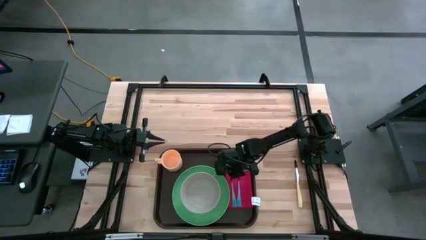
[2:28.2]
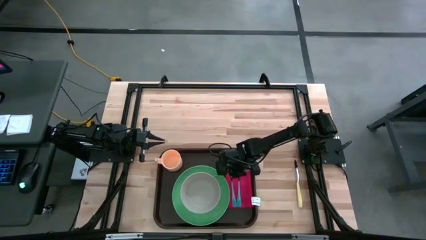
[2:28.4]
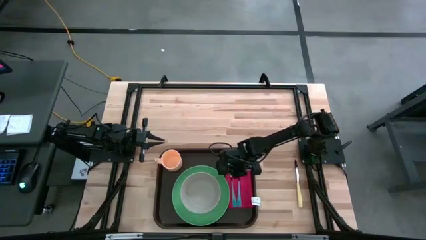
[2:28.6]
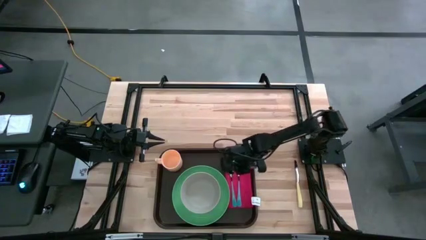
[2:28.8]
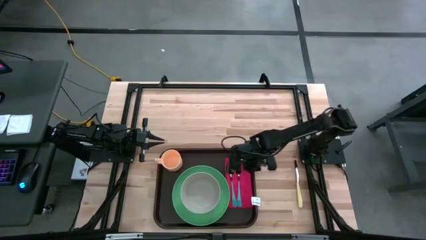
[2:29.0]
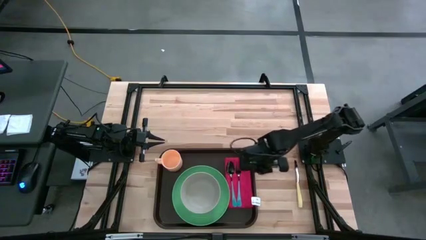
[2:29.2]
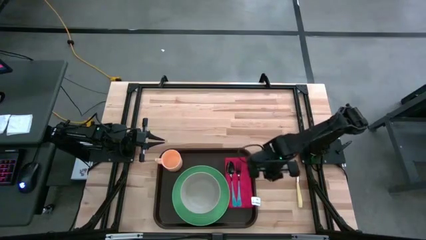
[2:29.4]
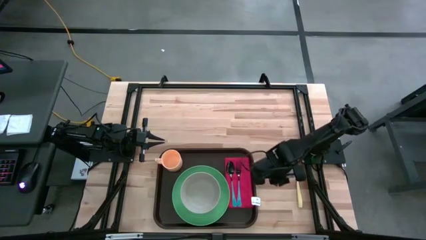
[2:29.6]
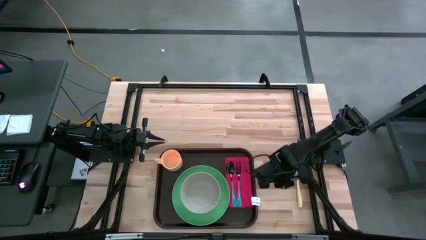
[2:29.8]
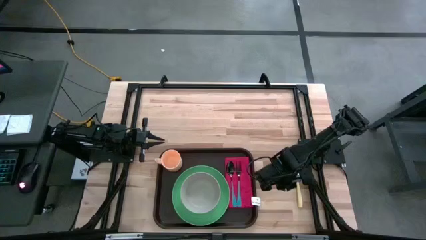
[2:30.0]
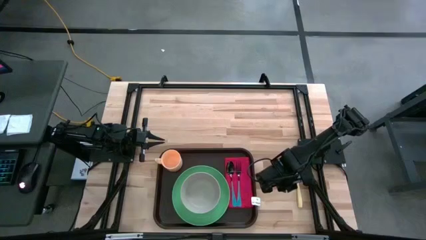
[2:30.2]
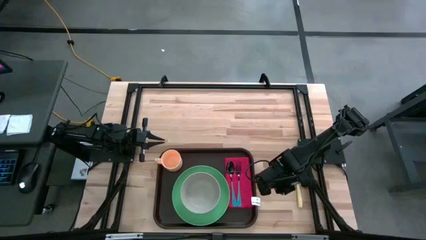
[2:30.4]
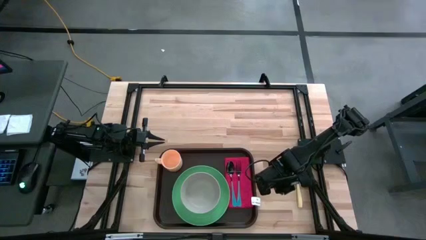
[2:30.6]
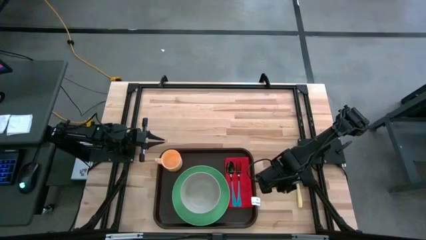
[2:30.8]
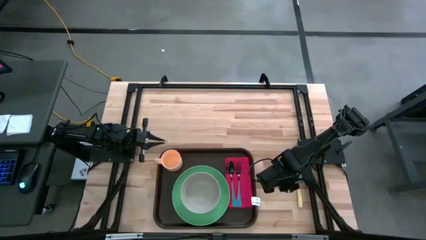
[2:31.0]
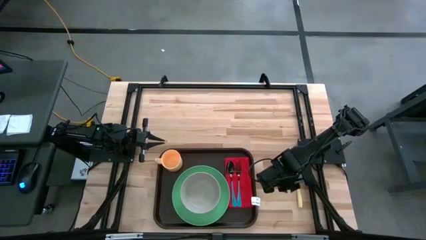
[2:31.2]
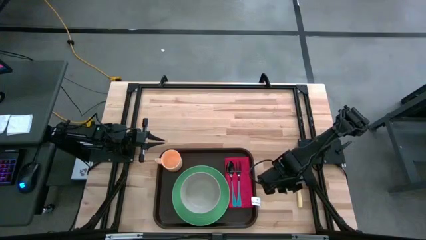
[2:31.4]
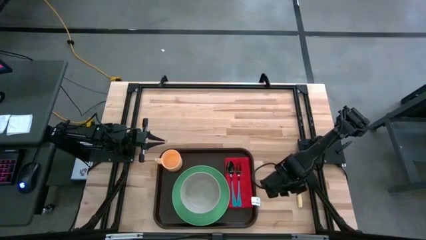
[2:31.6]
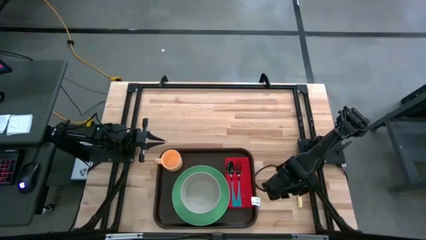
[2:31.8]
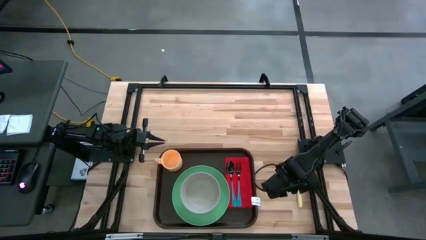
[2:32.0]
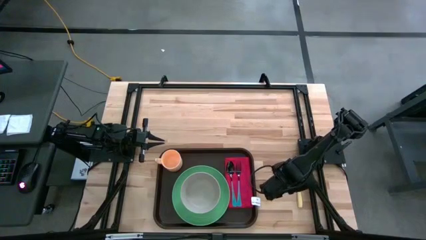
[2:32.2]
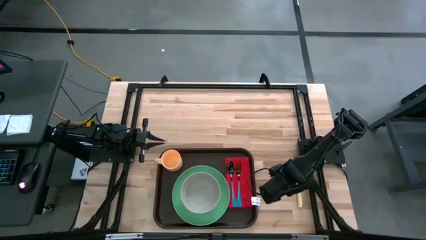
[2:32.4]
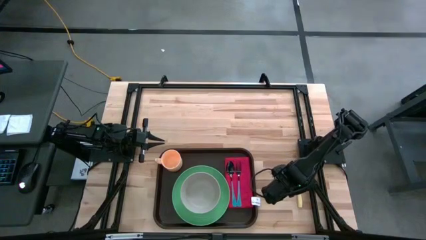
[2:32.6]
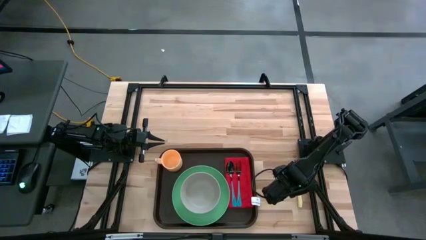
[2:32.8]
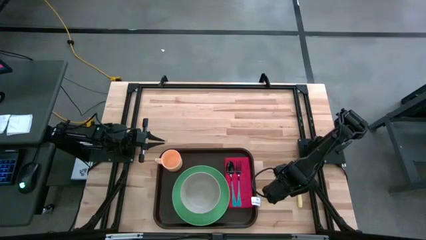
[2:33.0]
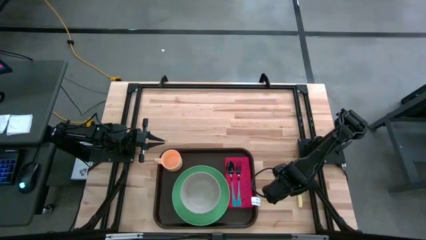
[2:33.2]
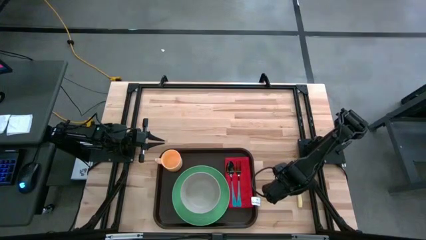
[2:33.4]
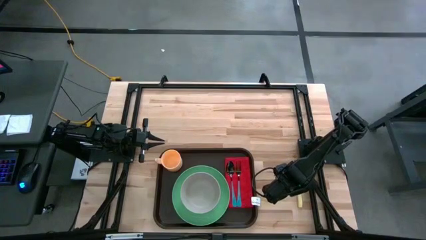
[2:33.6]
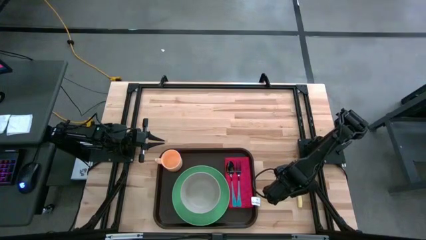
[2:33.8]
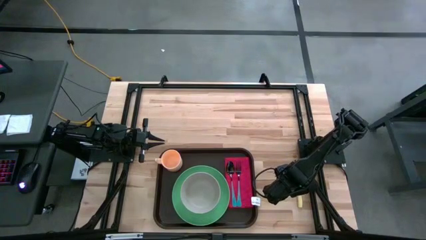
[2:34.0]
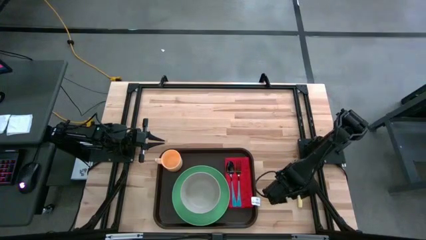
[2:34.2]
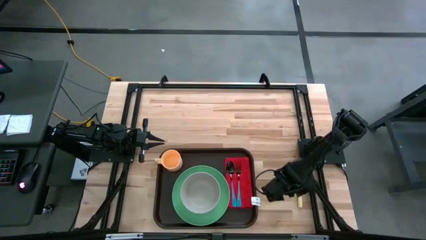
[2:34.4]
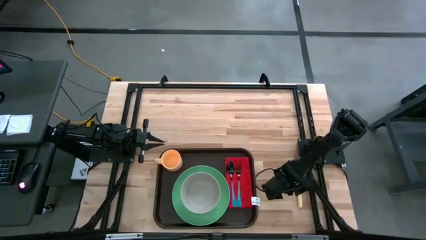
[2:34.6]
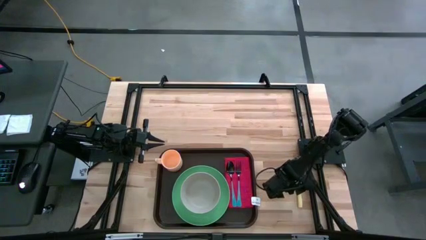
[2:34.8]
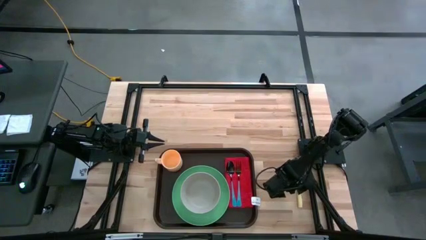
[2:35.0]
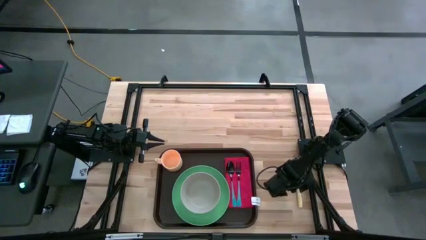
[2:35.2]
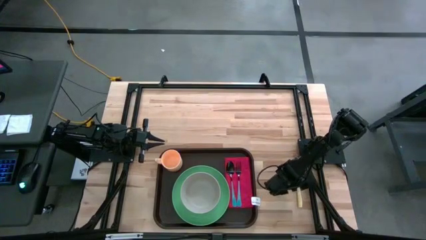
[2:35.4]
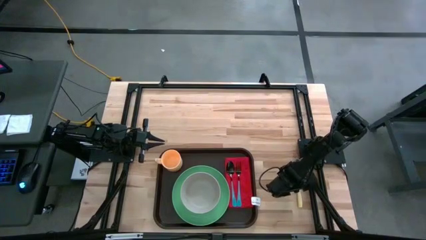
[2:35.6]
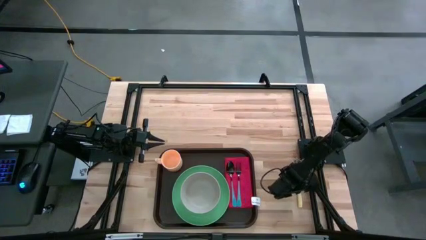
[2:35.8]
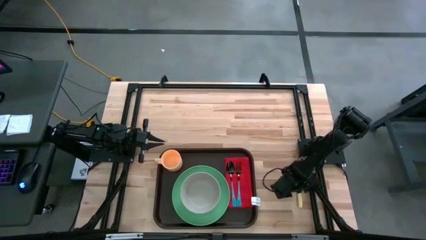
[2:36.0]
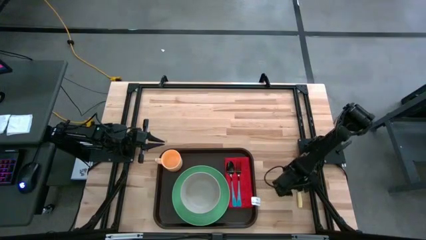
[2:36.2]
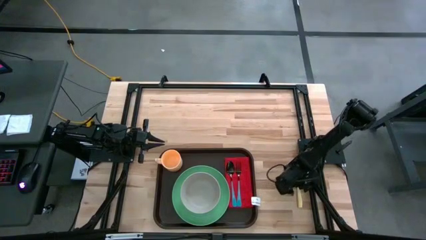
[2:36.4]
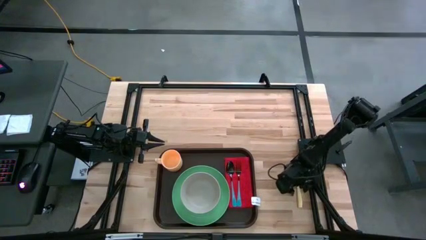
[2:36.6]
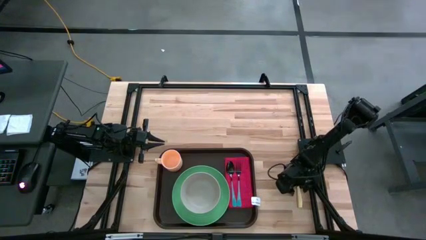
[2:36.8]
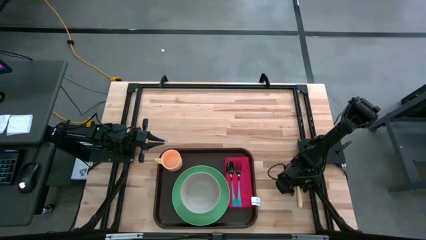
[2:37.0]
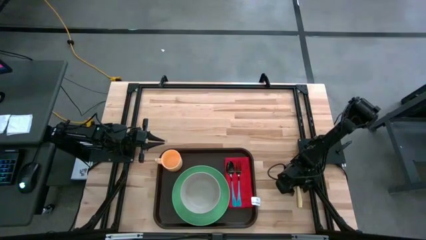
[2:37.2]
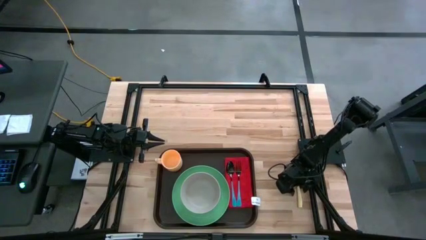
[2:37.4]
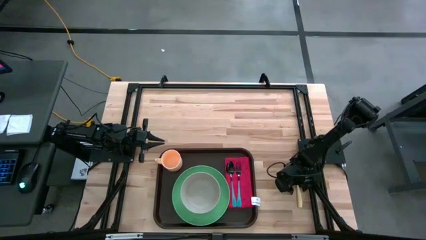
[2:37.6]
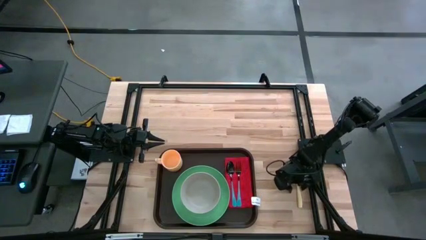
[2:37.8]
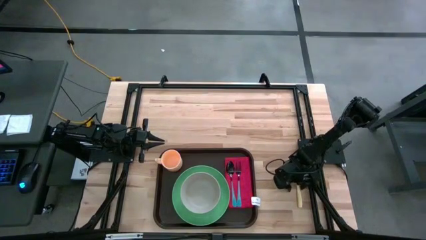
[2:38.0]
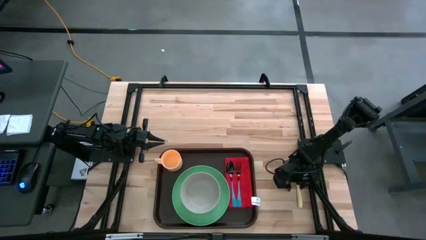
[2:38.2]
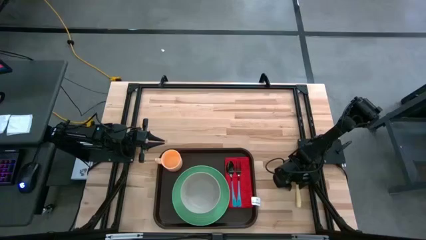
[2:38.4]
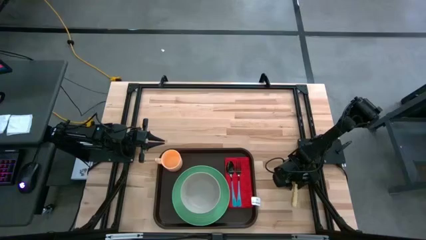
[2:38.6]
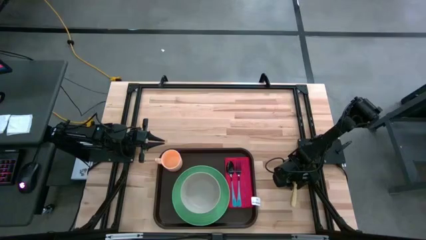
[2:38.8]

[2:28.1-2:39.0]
Task: Set up tray
Put the yellow table knife on top of the red table napkin to the right of the blue fork

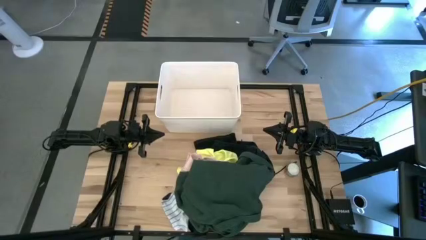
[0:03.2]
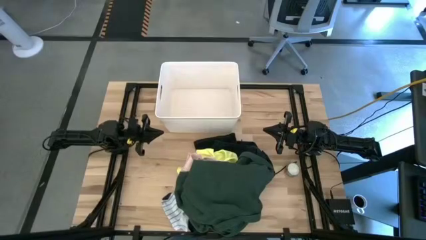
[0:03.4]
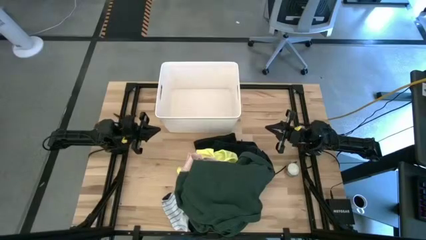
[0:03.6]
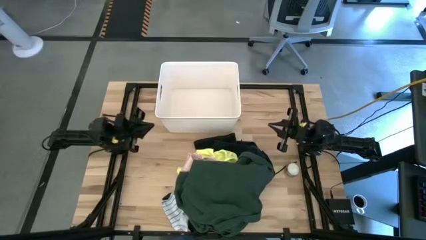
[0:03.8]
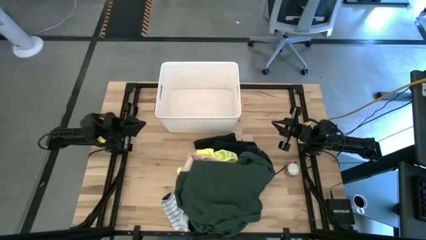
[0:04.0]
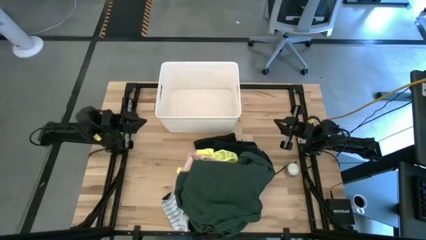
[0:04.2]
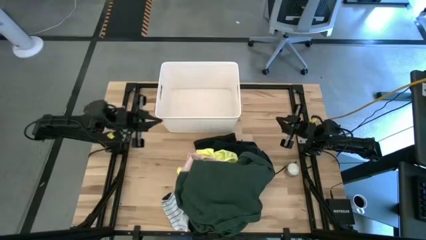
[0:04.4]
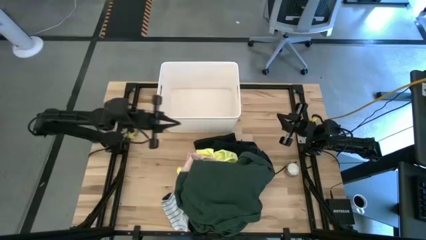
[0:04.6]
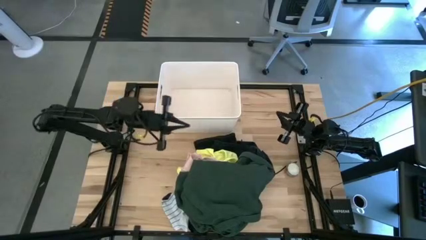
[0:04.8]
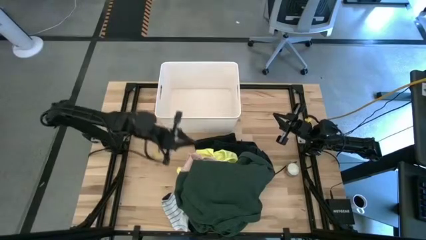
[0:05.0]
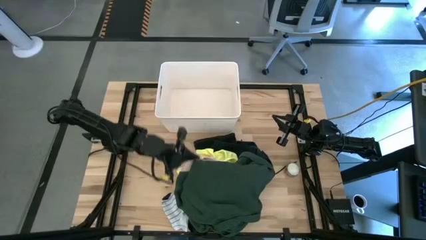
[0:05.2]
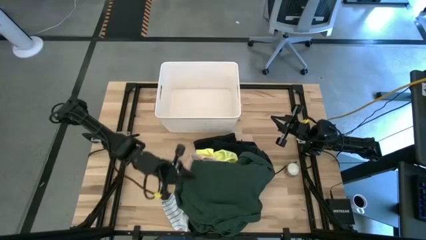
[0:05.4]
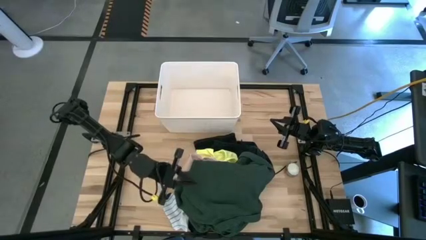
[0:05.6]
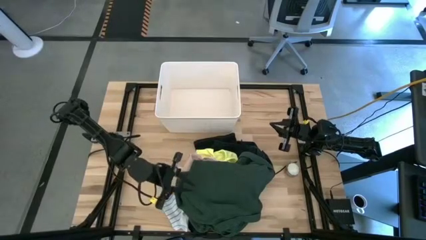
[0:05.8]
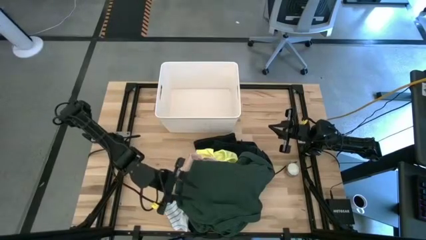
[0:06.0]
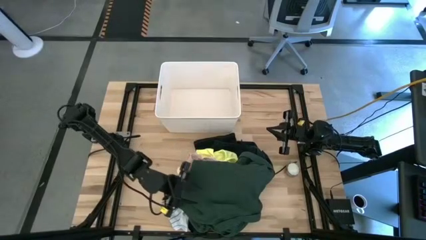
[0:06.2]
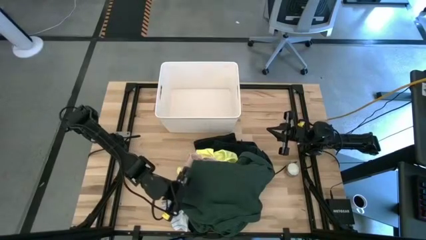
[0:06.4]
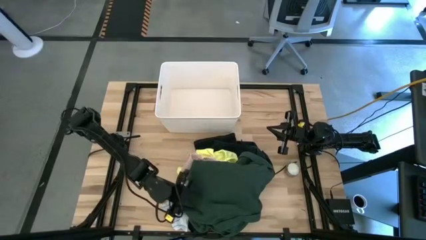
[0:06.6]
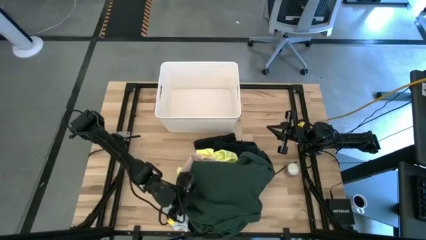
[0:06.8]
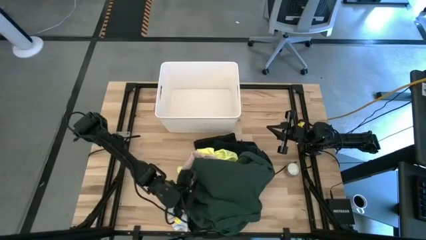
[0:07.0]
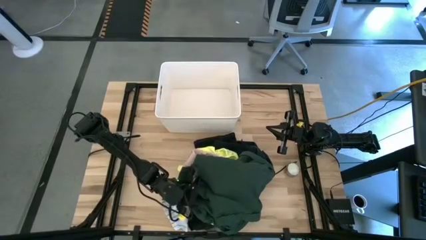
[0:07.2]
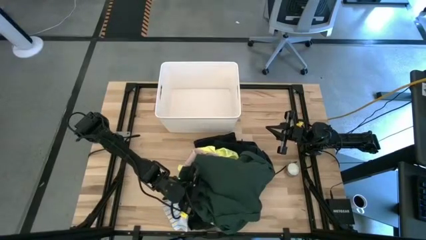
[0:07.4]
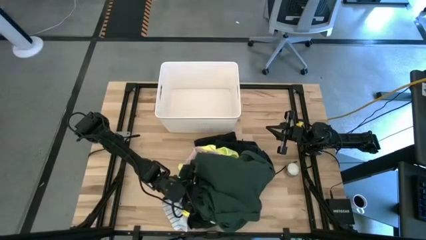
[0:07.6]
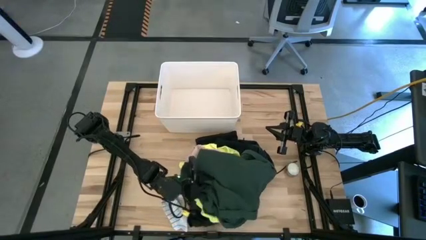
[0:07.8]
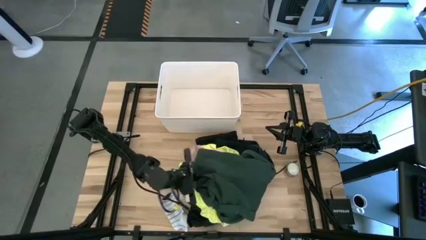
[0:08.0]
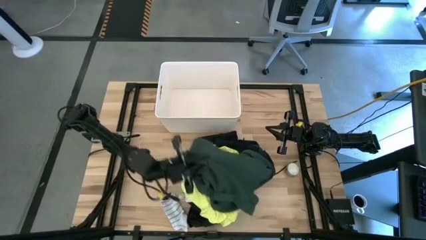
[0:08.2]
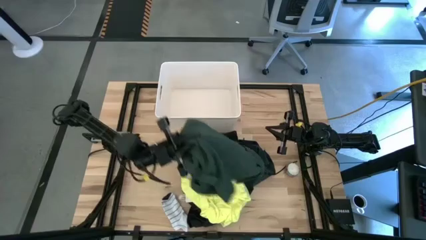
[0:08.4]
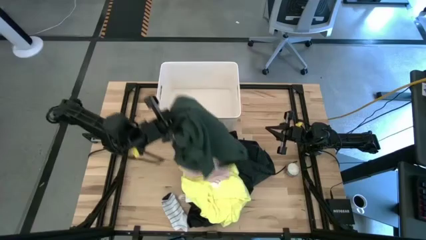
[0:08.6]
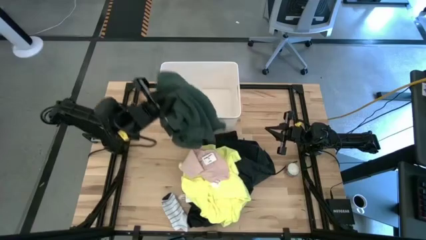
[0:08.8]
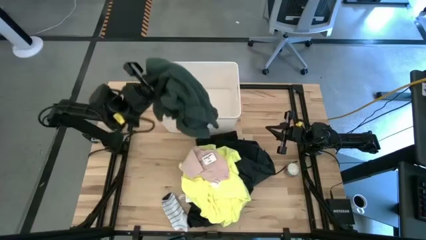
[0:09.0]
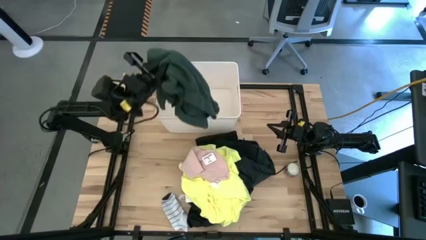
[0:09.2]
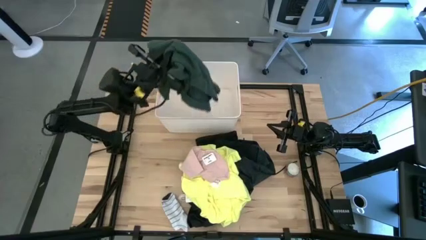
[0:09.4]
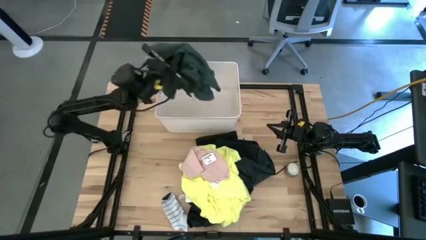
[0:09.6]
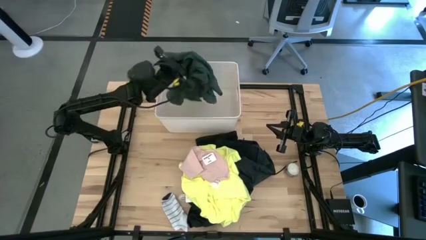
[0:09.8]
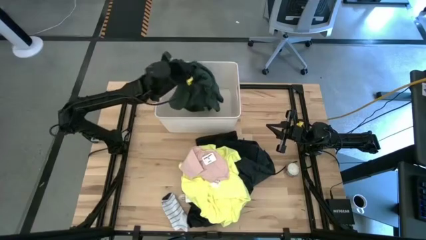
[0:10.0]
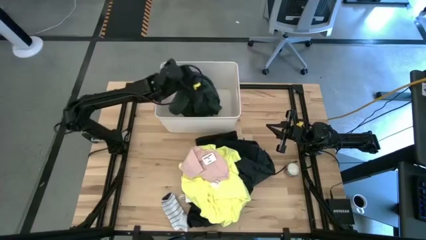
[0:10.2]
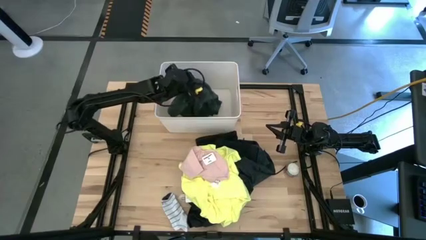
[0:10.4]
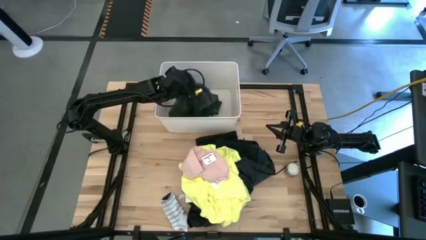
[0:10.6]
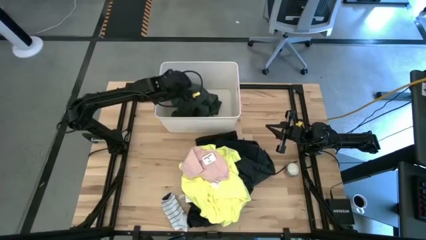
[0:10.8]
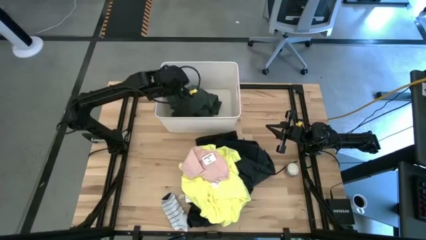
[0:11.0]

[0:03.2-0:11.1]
Task: Sort clothes
Put the green shirt into the white laundry organizer
